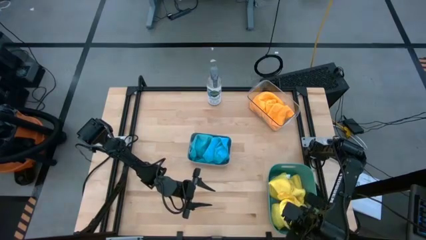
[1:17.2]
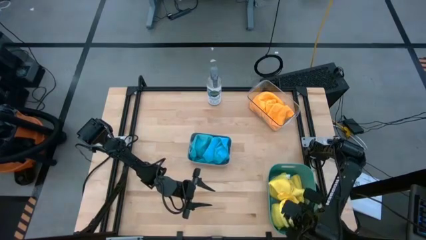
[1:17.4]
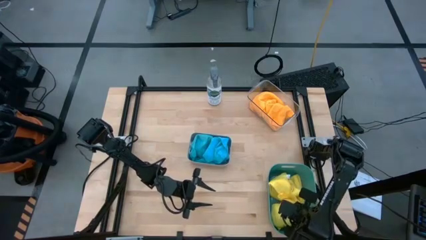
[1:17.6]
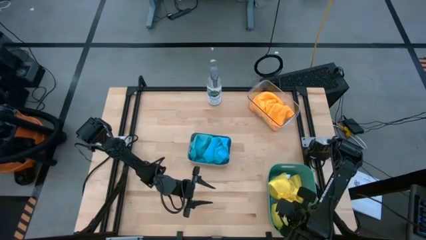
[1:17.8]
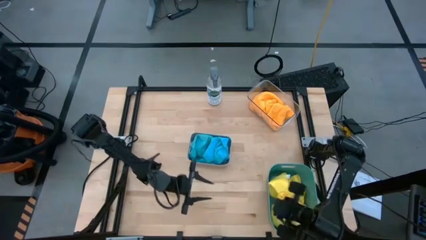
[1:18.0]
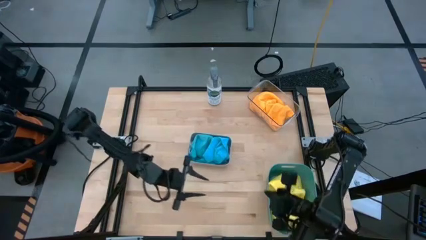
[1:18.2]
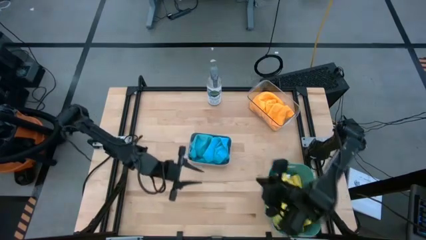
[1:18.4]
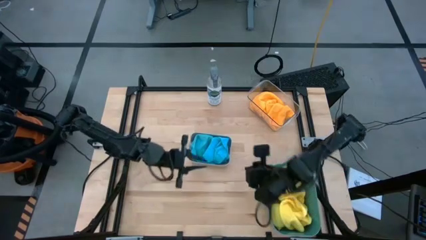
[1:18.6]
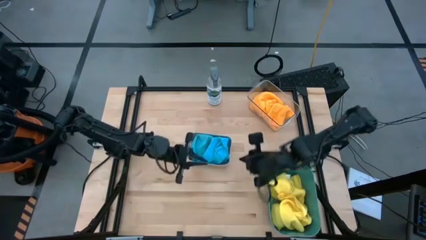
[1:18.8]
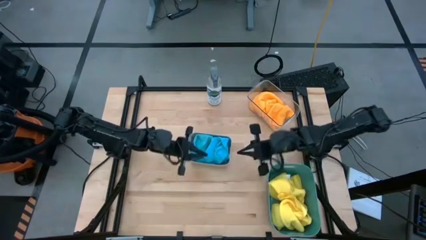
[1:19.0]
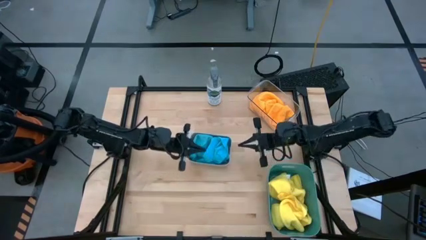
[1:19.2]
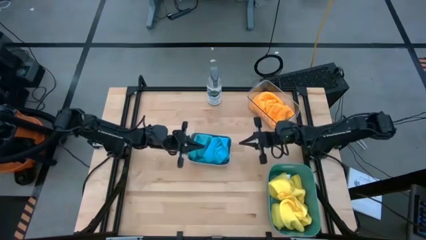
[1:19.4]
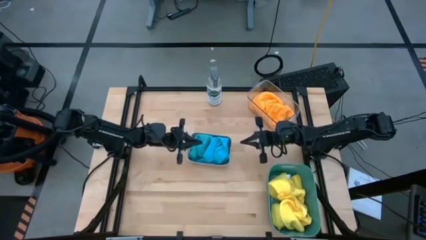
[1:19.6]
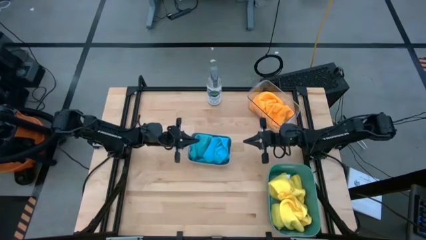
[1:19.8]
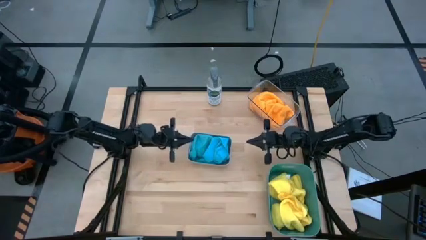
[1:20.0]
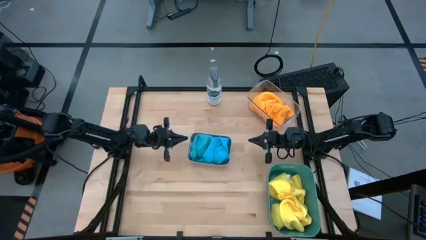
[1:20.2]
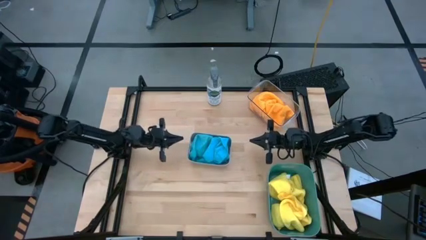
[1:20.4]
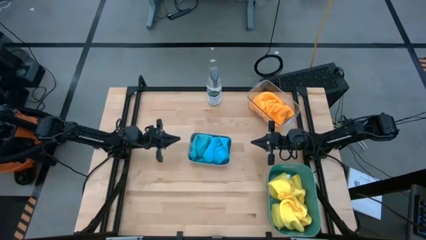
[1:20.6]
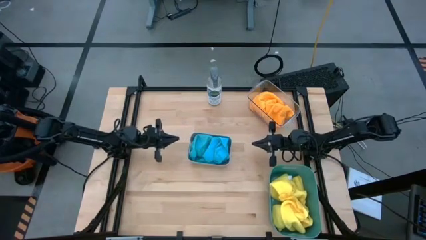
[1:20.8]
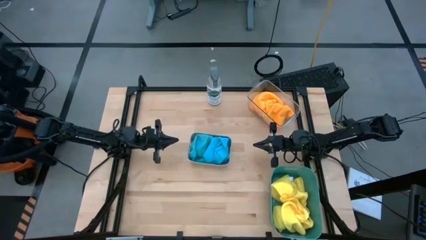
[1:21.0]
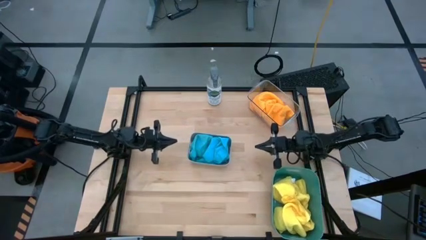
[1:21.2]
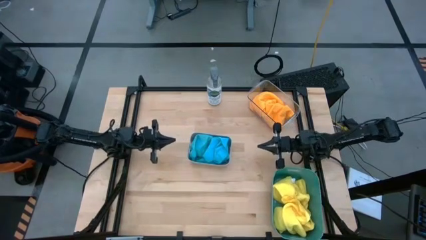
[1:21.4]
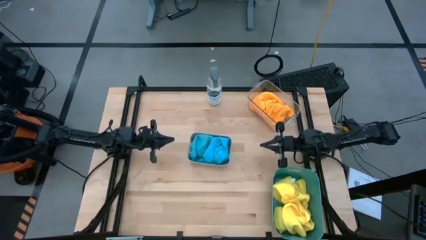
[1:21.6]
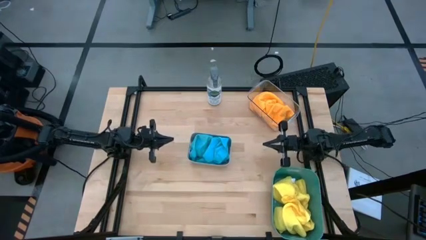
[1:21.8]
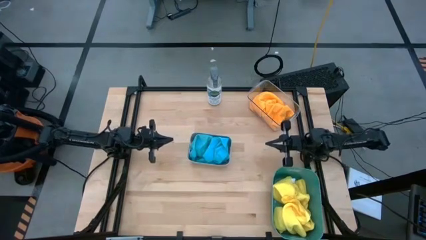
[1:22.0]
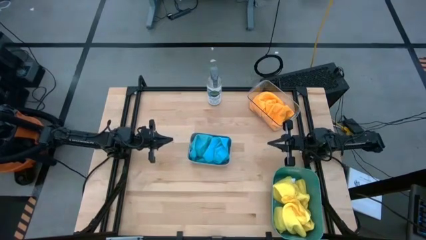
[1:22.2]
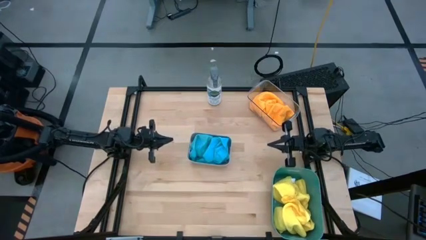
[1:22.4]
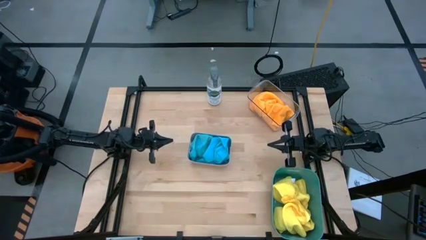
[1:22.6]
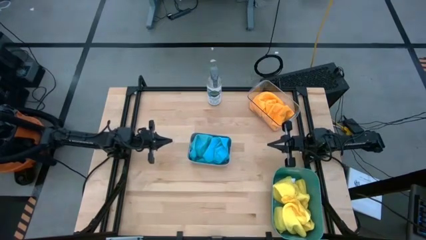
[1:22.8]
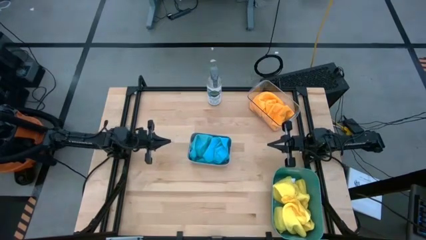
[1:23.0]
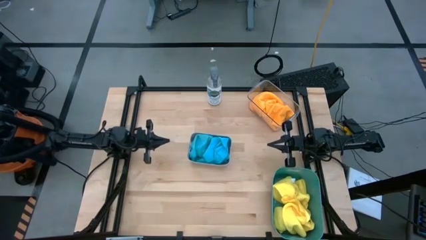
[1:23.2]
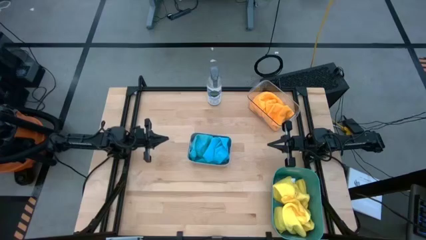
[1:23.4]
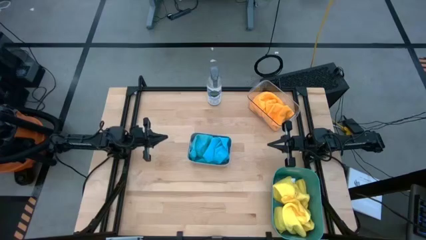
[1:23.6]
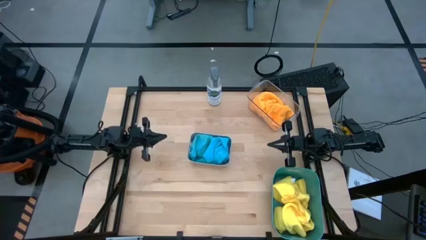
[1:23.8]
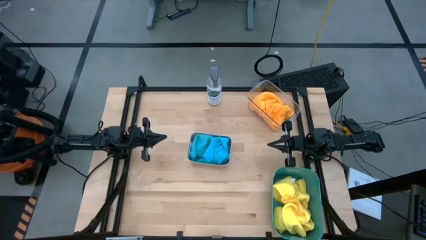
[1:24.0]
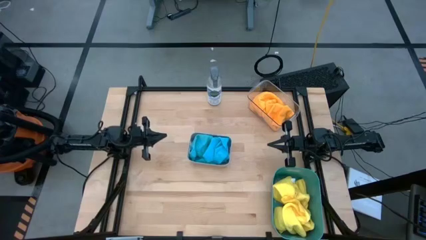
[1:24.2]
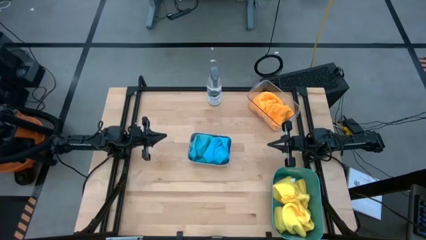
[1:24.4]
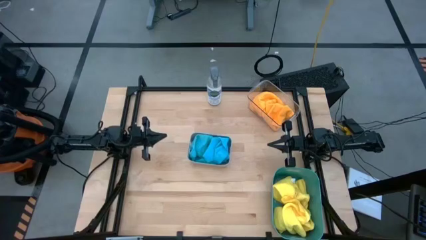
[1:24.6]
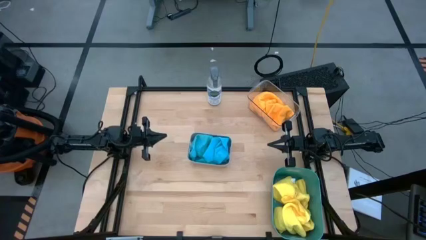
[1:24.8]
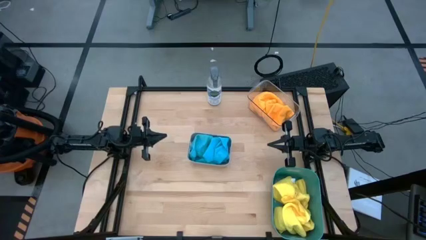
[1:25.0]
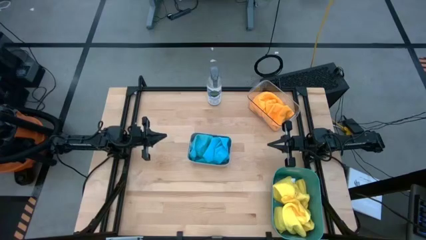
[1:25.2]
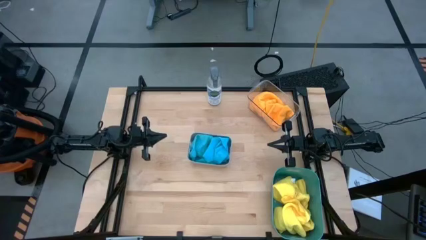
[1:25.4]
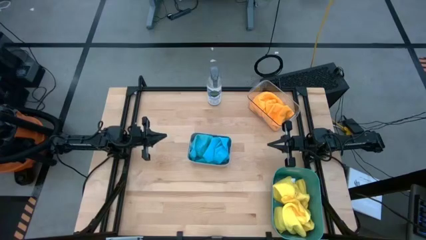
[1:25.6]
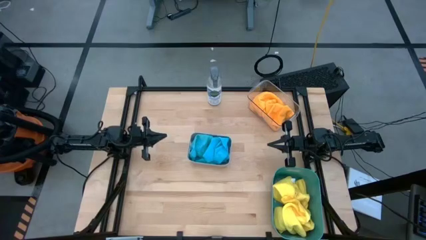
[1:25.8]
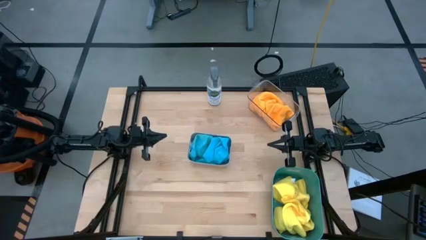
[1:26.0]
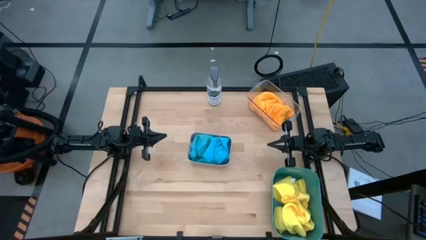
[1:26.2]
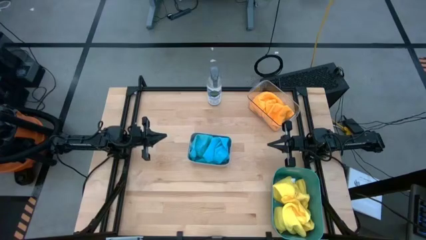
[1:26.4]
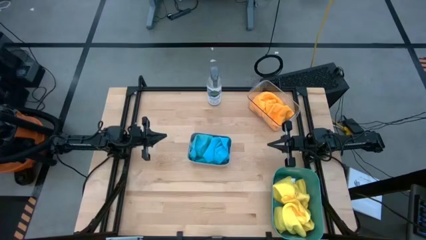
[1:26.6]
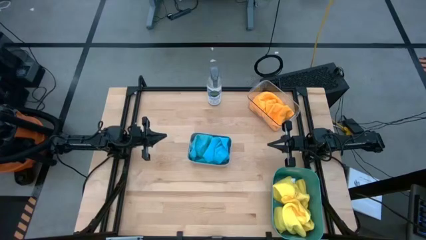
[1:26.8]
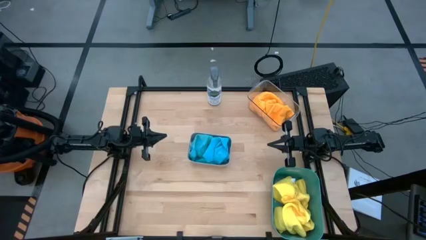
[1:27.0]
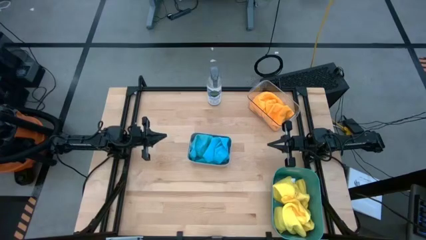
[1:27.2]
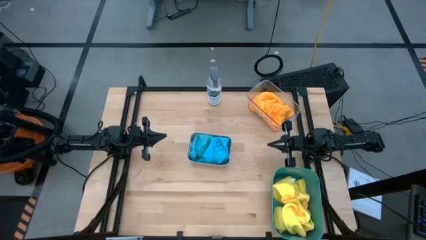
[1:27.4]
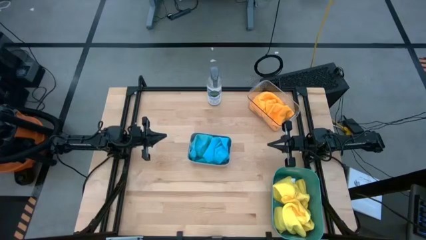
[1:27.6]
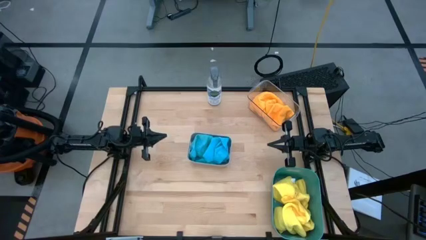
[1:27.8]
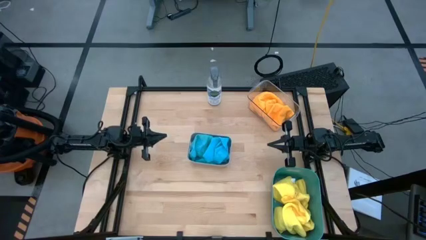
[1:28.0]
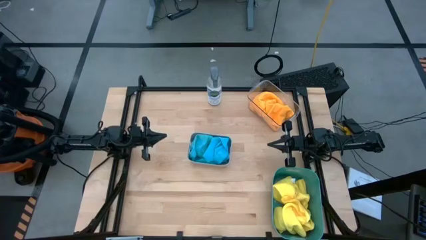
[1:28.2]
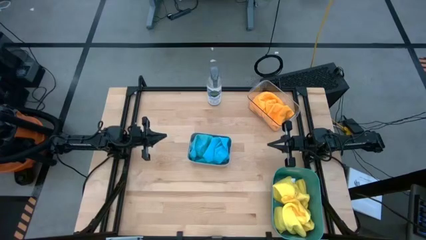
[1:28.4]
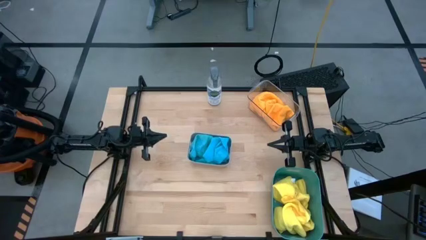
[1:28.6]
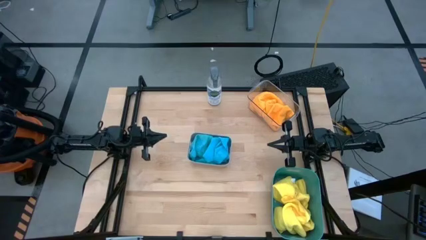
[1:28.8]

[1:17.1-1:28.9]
Task: Sort microfiber towel by color & place in baskets
Return to Home Position

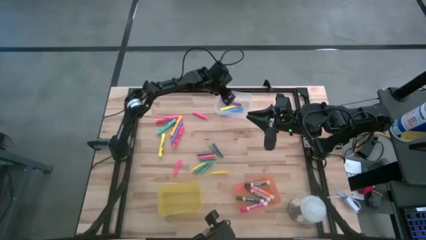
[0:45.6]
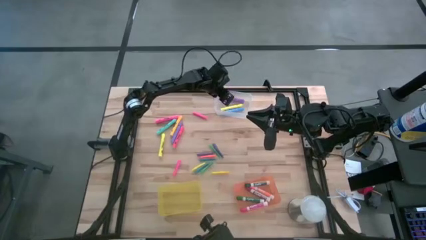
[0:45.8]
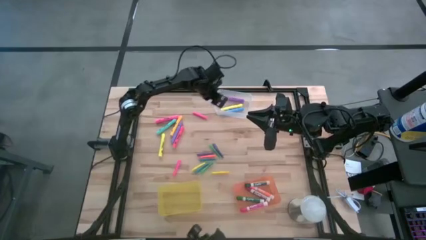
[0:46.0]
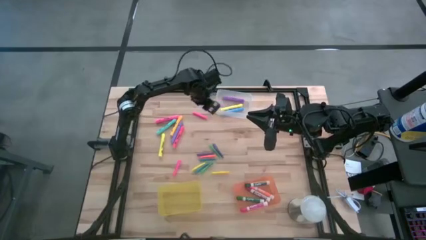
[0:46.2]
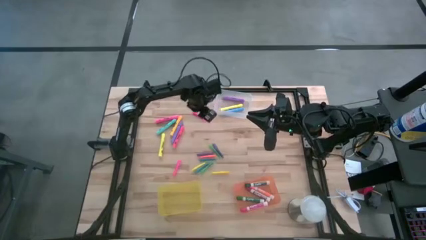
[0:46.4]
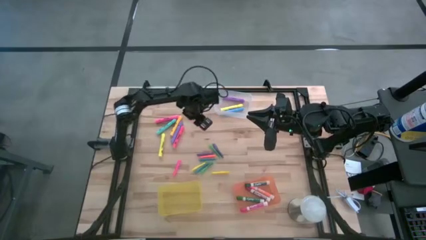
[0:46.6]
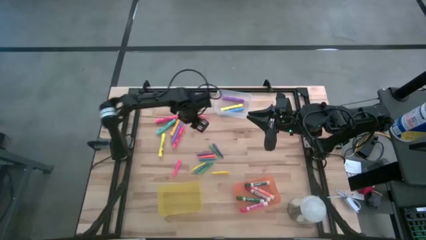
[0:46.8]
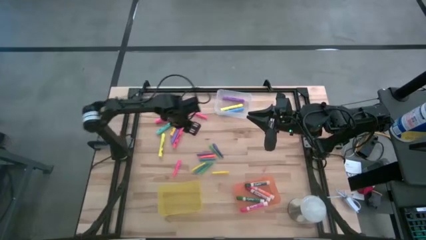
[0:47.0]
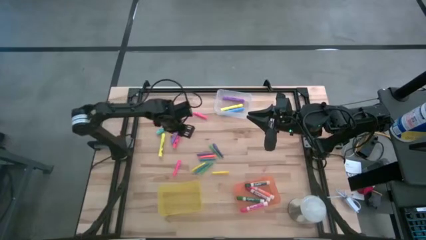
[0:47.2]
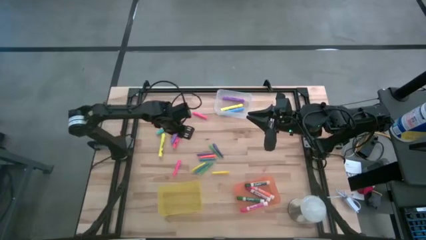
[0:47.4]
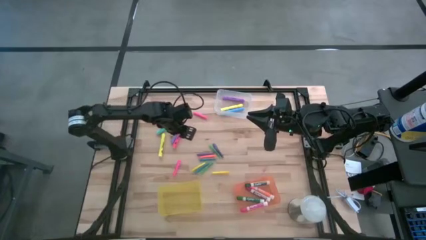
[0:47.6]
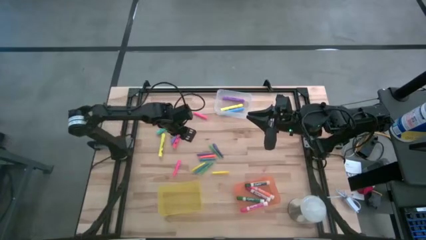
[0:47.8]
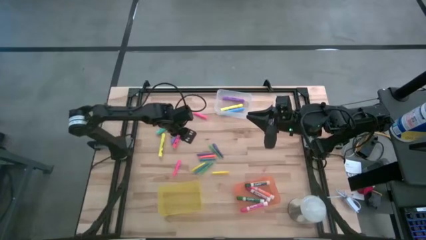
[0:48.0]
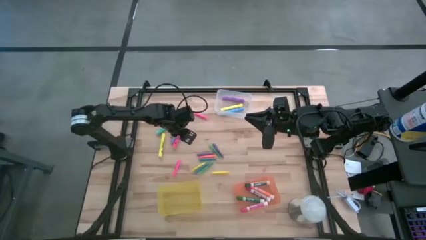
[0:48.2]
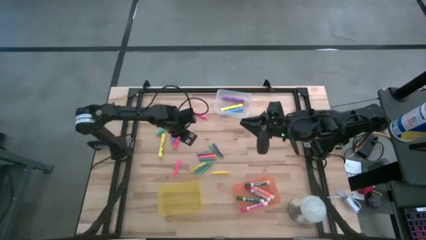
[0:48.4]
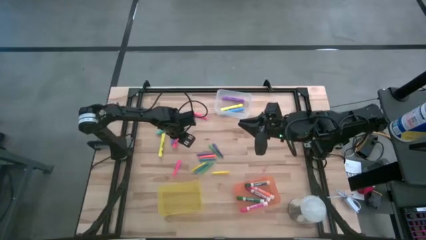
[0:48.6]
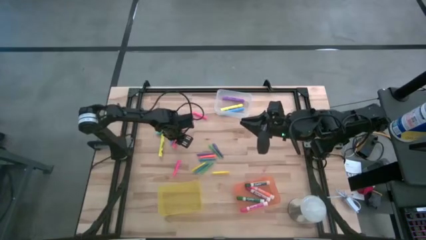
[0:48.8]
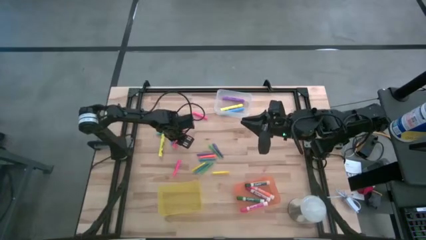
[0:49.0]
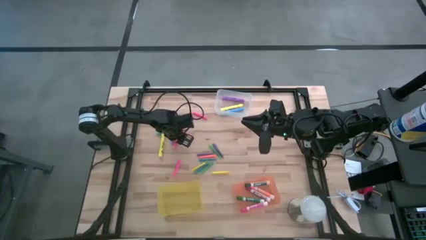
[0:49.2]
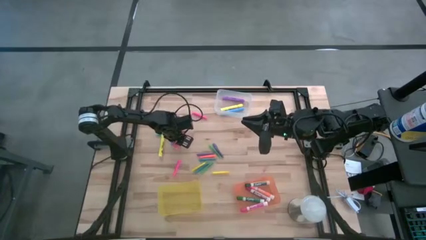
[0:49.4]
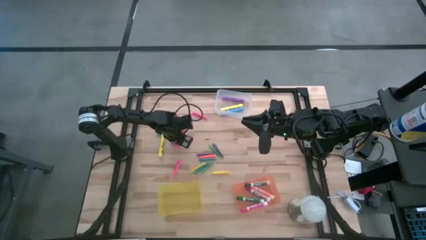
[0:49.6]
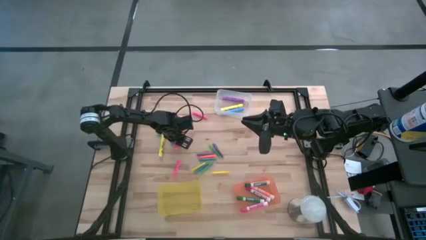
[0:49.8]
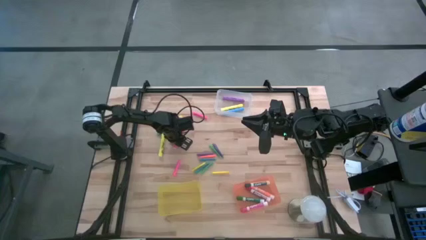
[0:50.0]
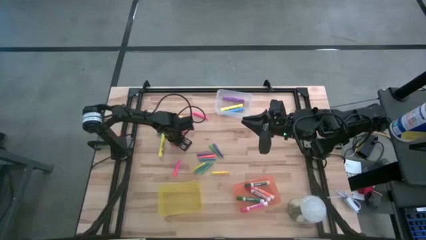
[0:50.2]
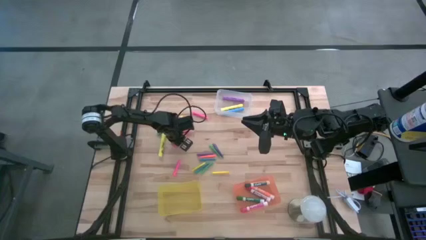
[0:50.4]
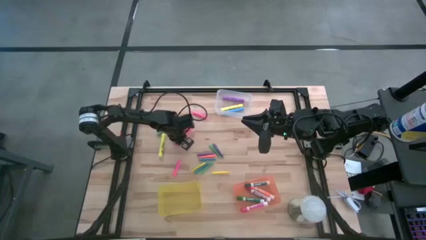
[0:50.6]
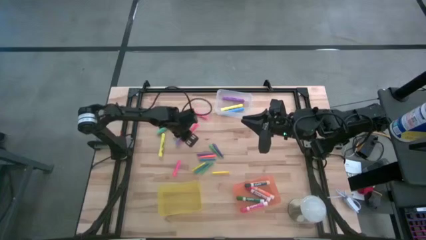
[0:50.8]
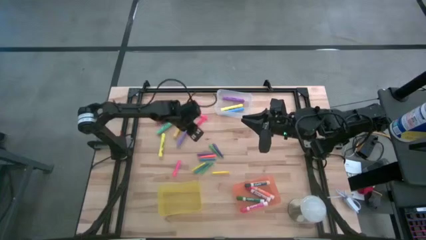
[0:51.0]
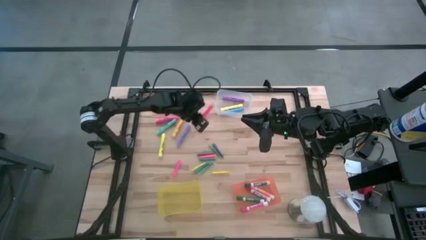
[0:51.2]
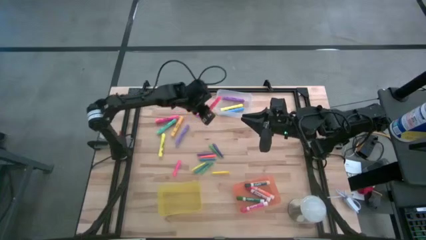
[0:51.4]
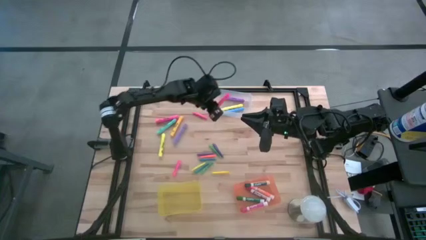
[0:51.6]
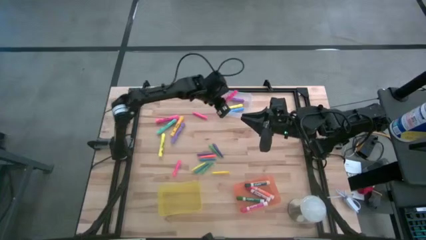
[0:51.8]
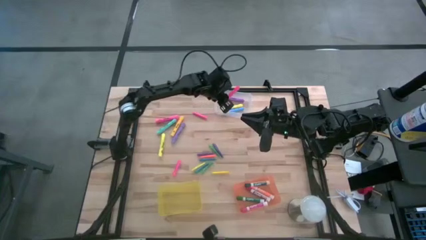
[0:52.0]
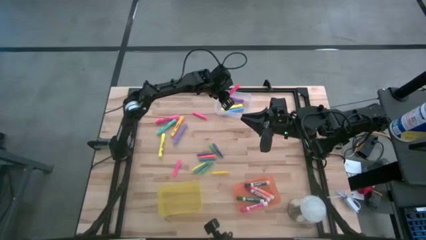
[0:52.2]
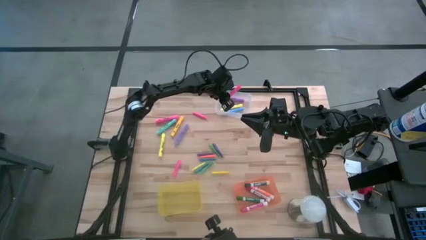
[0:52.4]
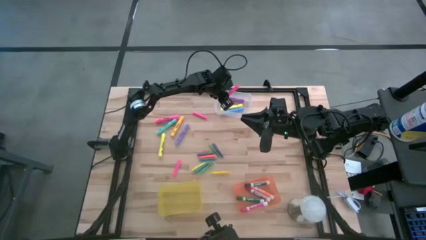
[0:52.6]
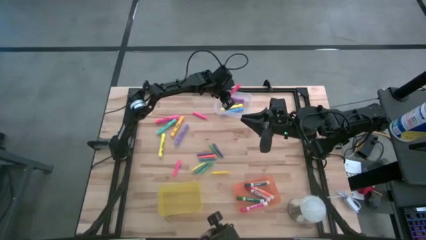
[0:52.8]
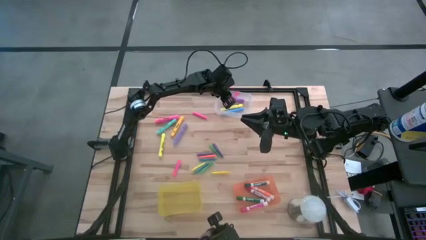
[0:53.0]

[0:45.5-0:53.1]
Task: Pick & Place Markers
Put the bottom pink highlighter pen into the transparent bin
